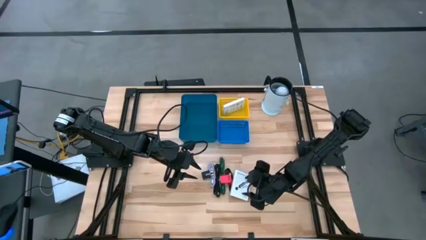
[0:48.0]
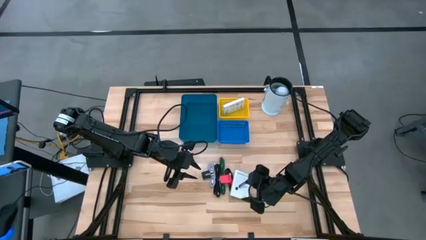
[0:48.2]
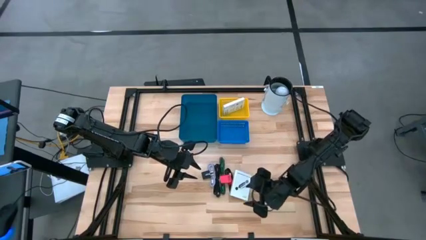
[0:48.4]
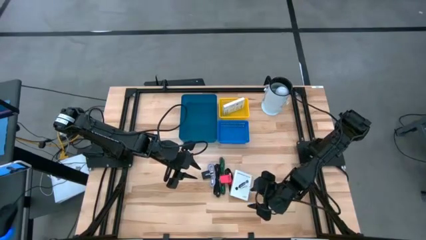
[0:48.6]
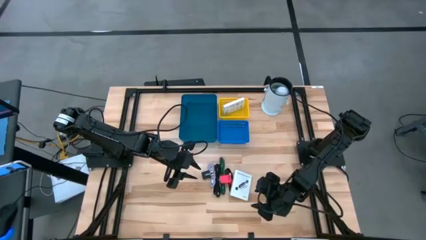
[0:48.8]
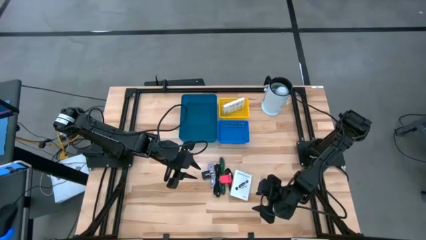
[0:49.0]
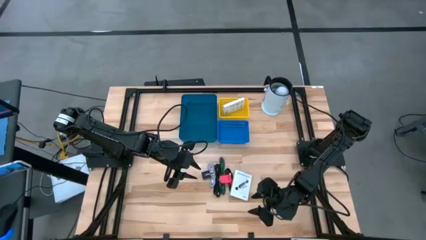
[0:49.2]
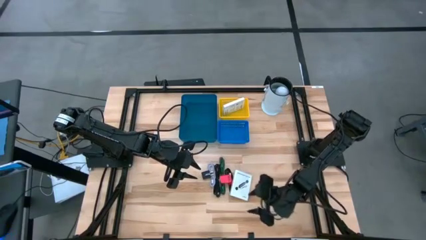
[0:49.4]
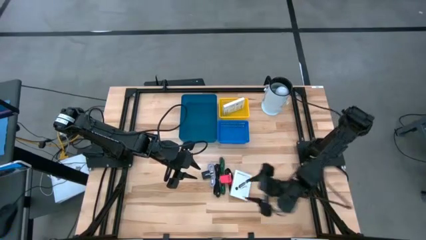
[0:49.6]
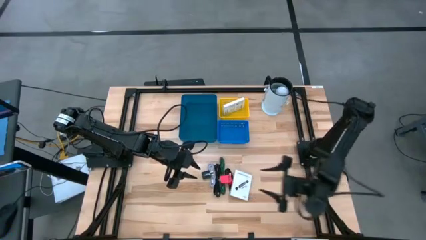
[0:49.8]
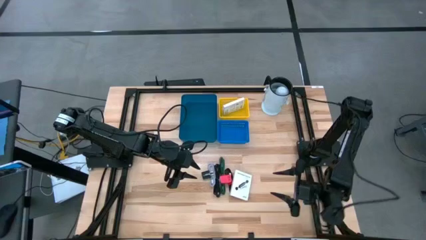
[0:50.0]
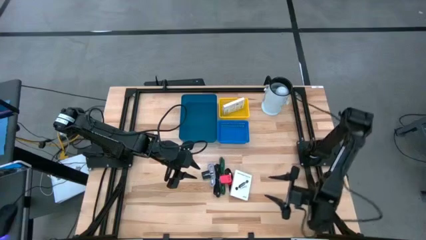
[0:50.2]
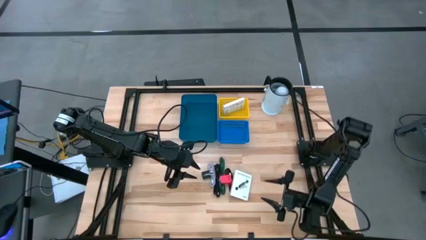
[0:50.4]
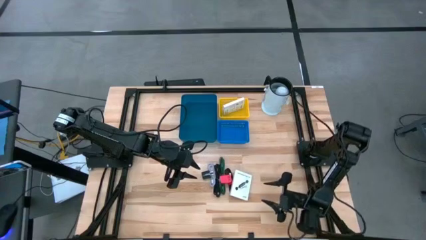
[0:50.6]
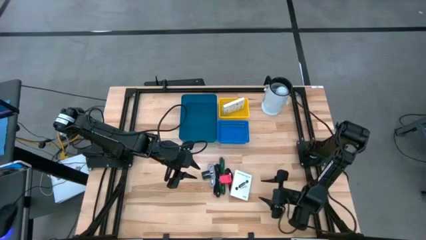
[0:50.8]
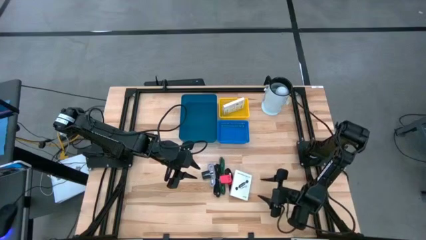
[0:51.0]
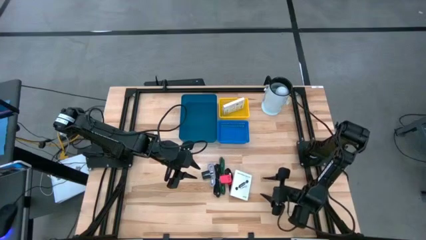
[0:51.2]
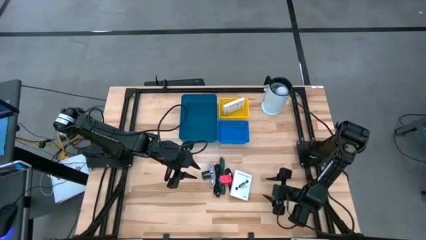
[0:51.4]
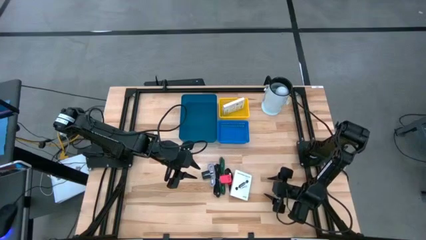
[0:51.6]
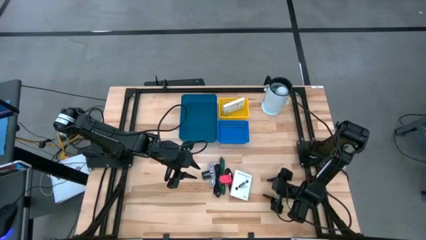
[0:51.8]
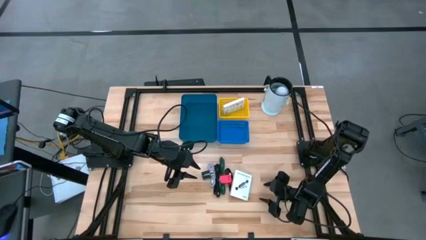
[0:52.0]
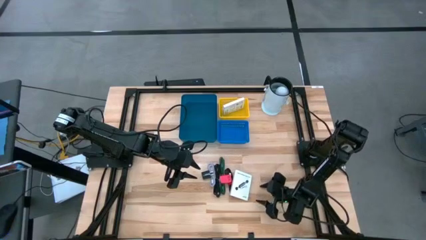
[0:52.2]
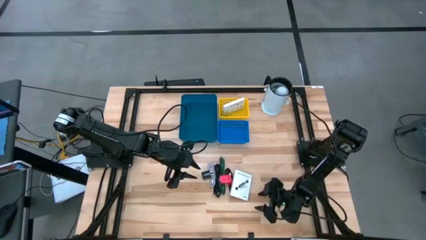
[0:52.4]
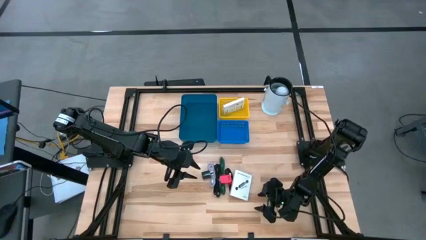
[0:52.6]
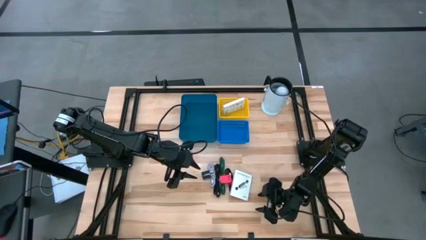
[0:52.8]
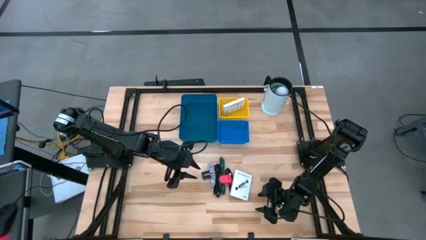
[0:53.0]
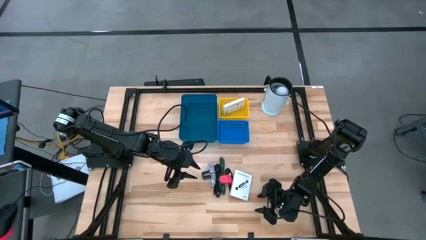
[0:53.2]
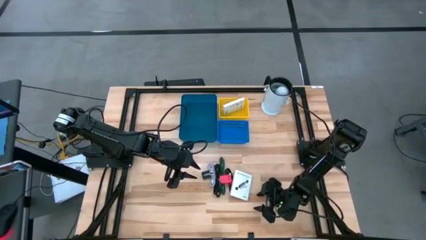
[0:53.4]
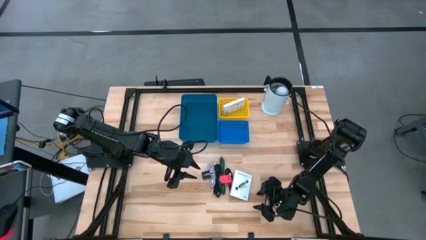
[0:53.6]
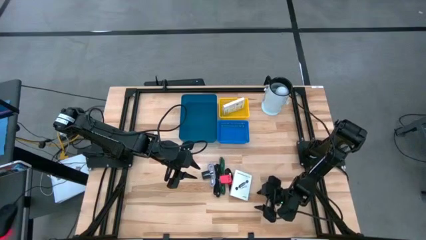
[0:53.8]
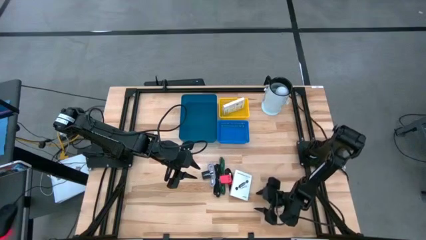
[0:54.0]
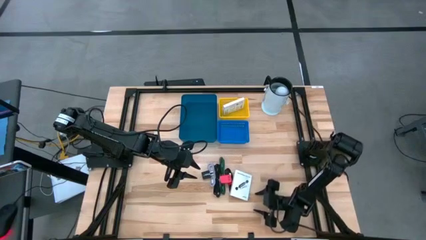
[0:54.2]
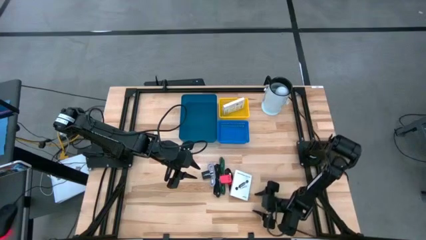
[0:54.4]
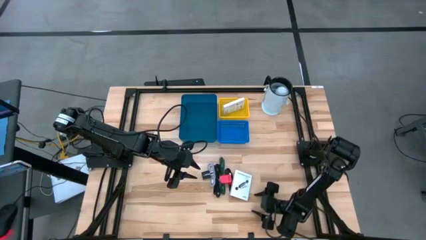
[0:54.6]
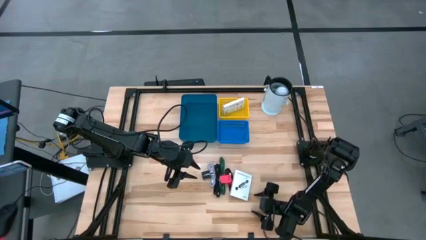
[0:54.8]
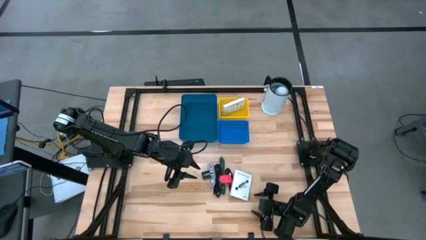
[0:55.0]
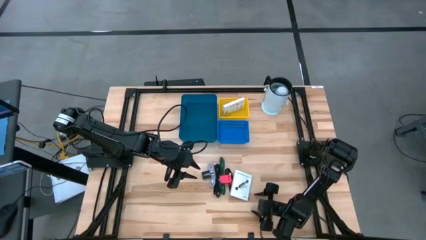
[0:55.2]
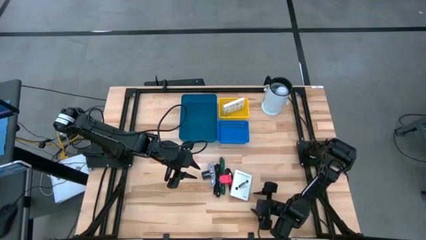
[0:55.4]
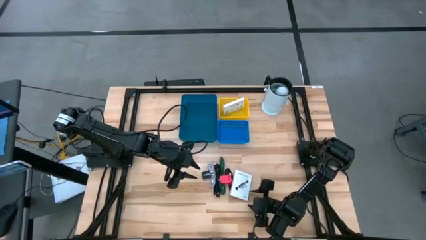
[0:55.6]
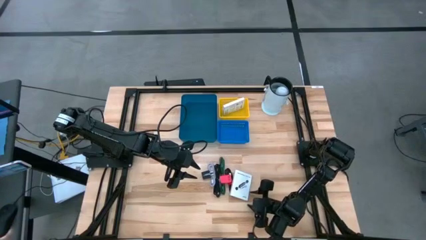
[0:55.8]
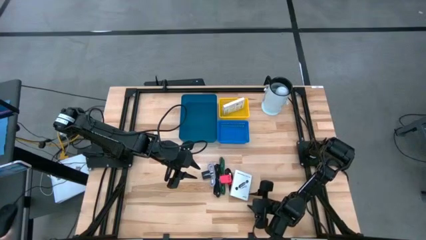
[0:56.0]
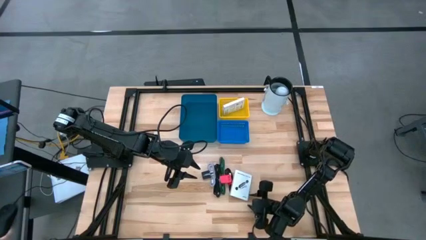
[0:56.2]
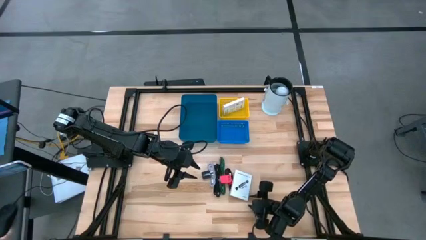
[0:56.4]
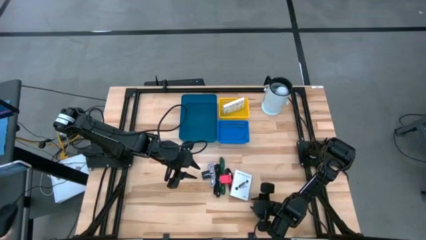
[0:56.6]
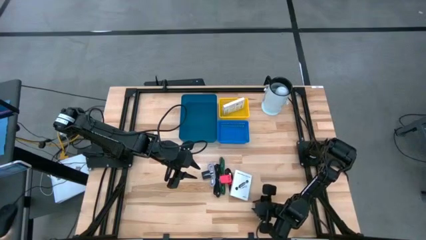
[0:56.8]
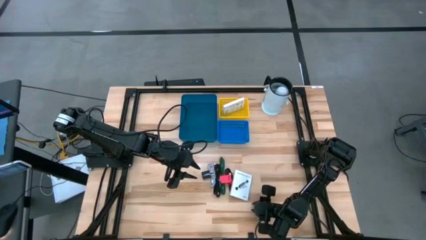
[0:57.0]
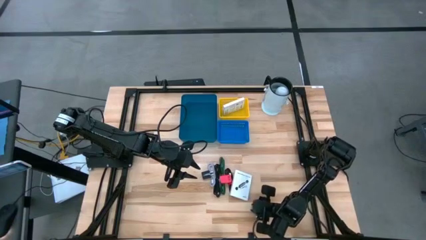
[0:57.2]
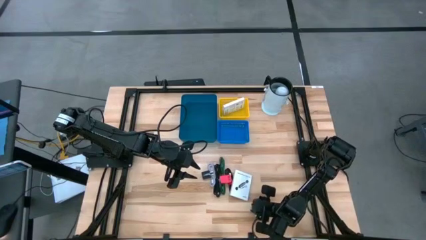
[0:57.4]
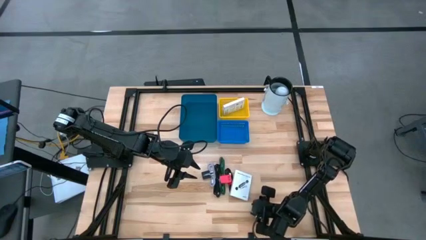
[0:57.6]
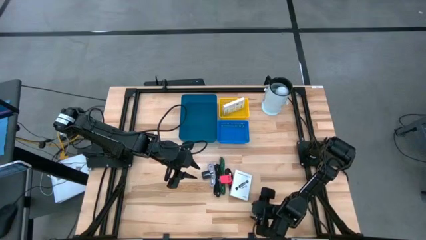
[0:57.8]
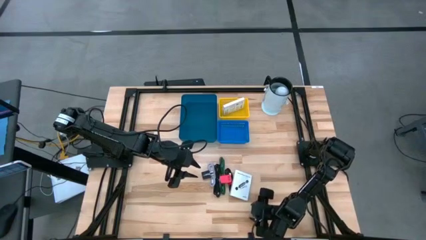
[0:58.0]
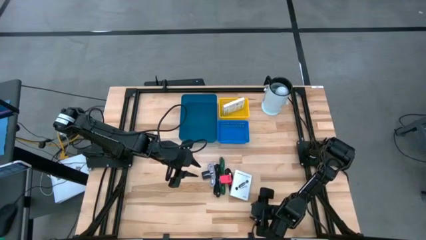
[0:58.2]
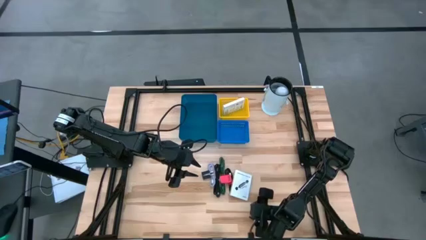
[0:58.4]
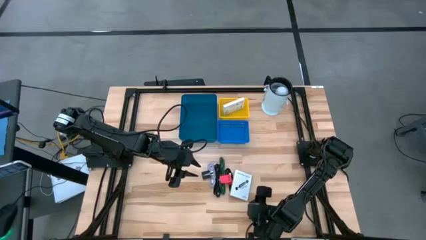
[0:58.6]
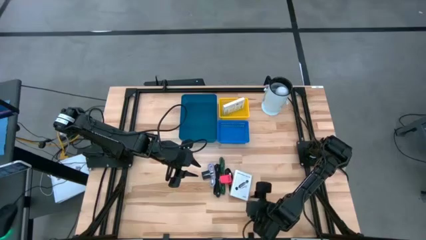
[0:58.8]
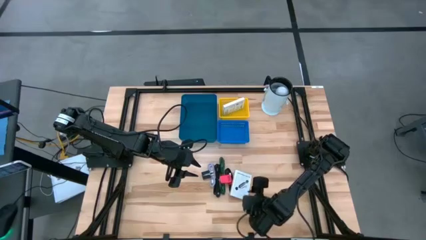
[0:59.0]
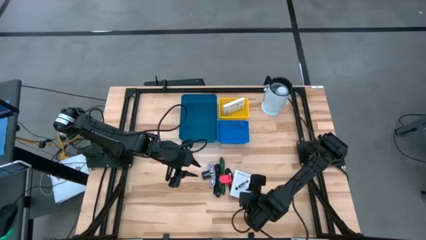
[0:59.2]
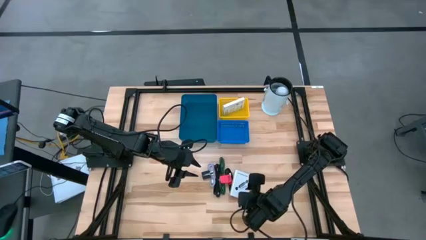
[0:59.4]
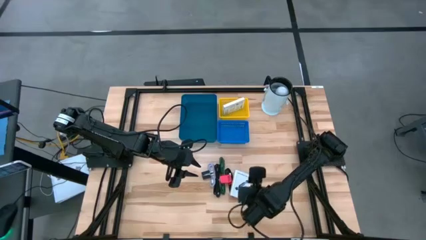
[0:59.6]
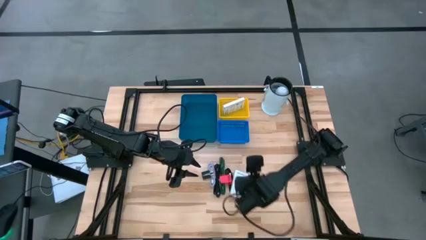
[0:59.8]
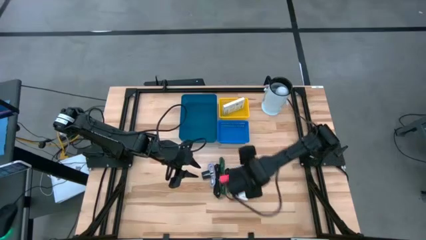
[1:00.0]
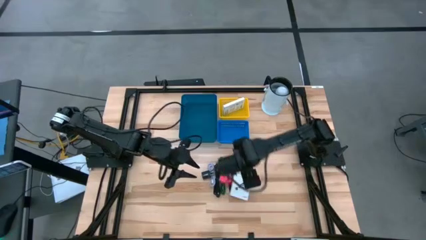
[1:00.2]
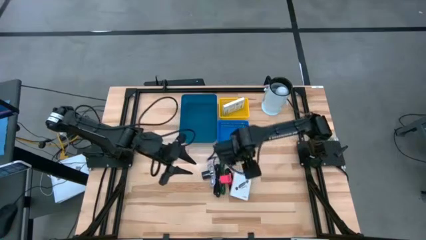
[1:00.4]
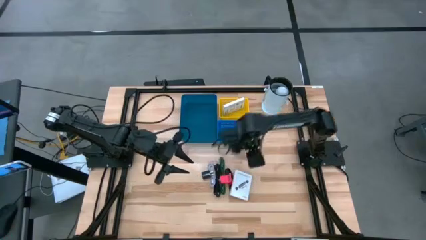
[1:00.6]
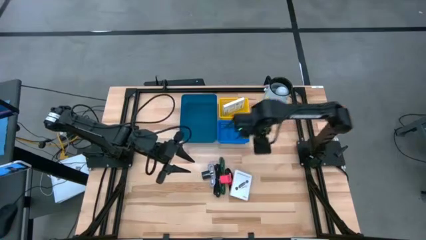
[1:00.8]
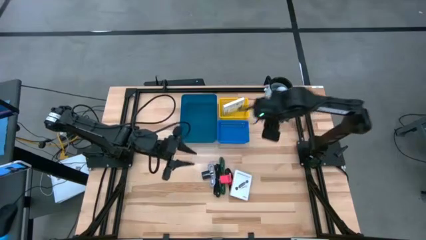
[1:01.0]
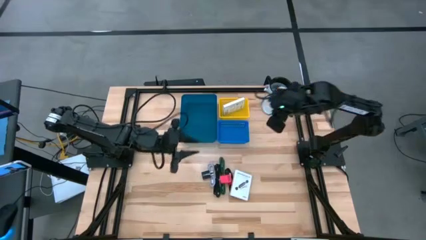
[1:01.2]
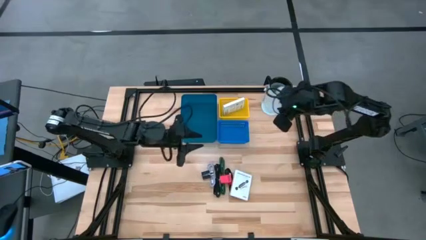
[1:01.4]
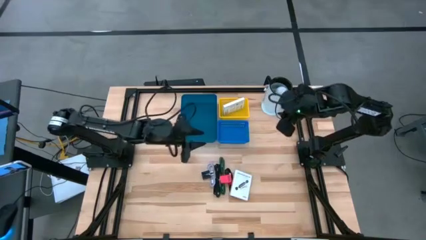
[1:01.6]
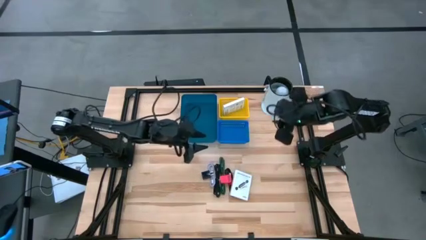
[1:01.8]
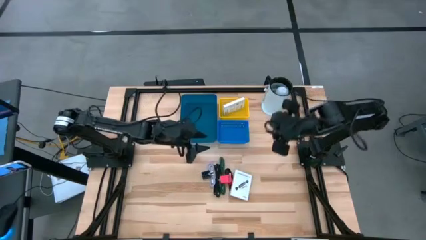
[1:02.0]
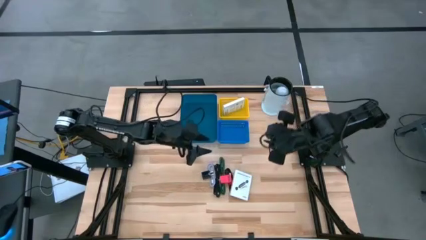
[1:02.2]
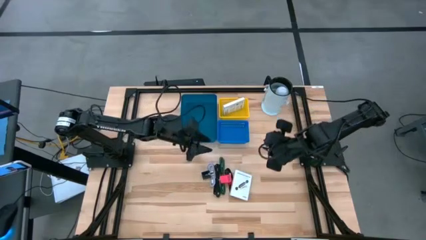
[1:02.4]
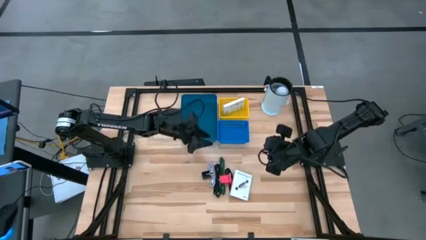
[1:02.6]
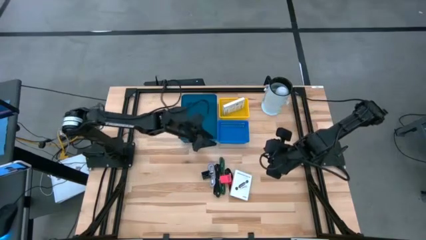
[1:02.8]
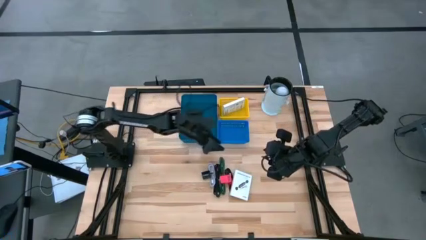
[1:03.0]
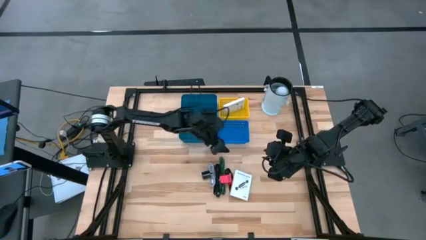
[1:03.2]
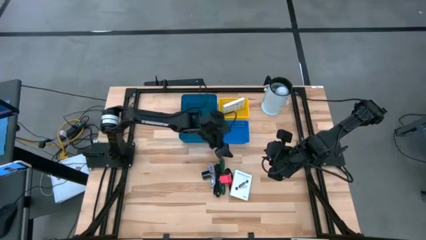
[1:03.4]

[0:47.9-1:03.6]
Task: Pick and place items into bin
Put the card reader box into the yellow bin
